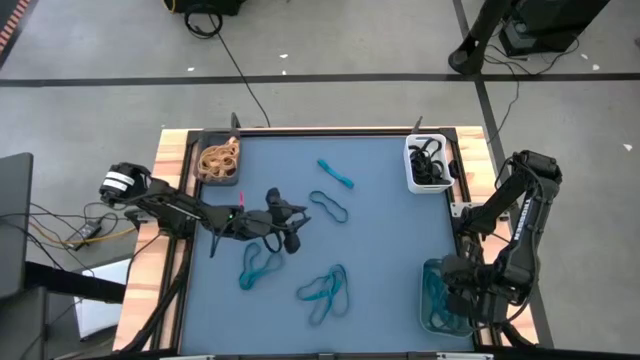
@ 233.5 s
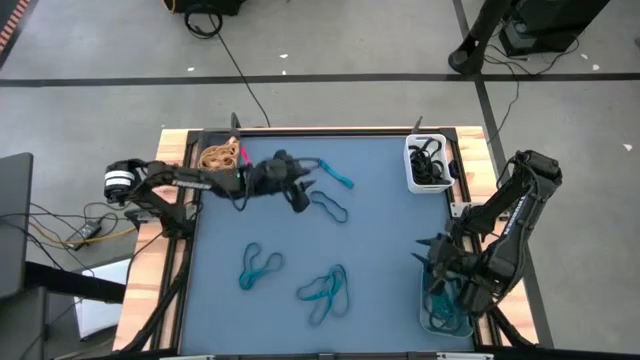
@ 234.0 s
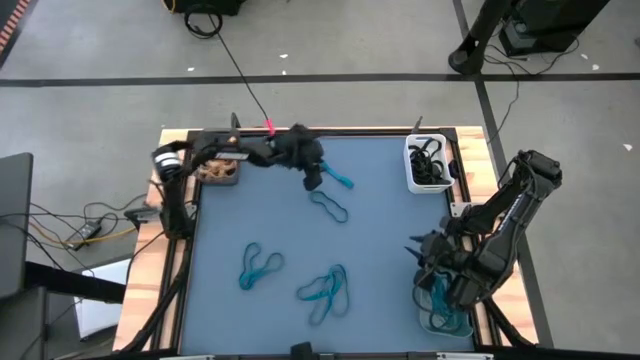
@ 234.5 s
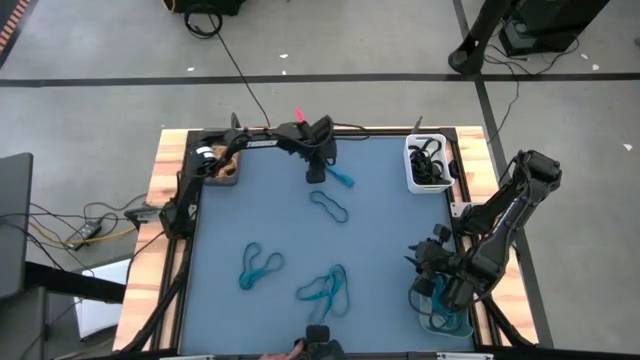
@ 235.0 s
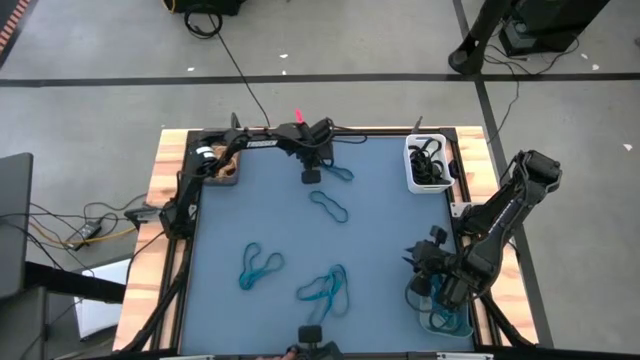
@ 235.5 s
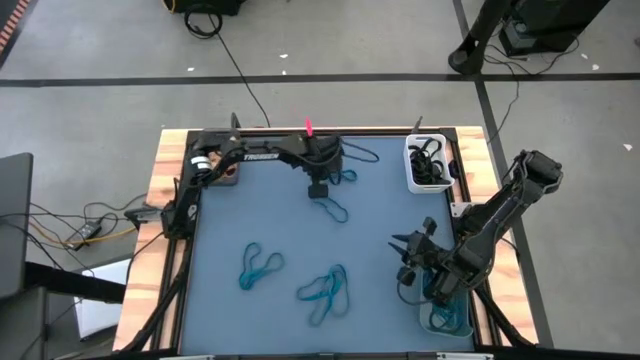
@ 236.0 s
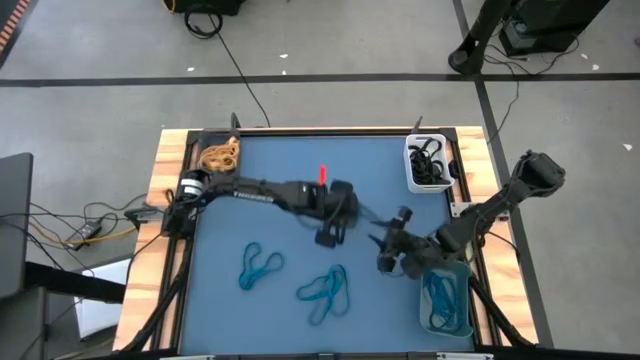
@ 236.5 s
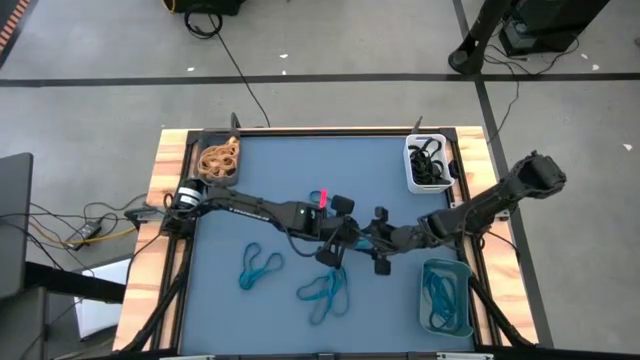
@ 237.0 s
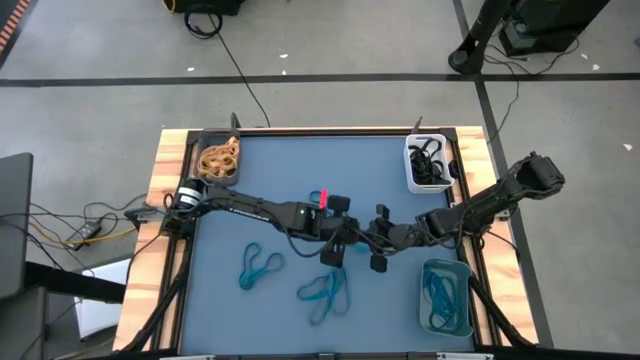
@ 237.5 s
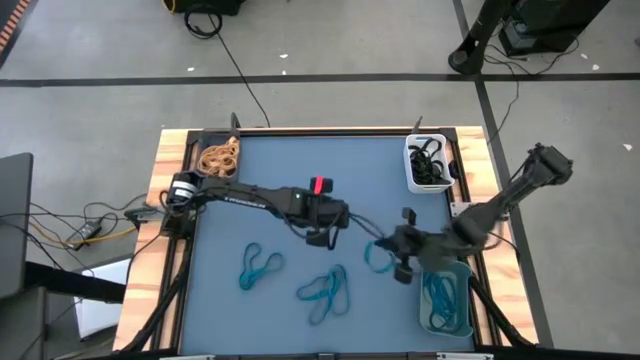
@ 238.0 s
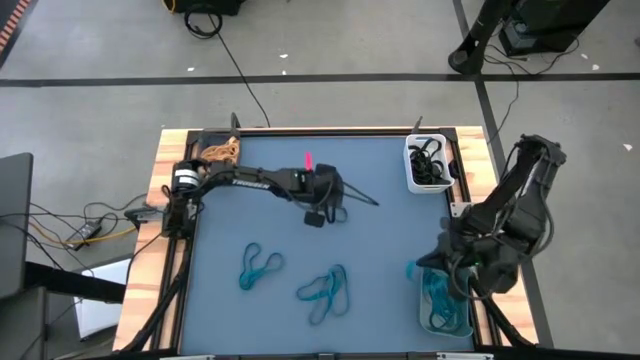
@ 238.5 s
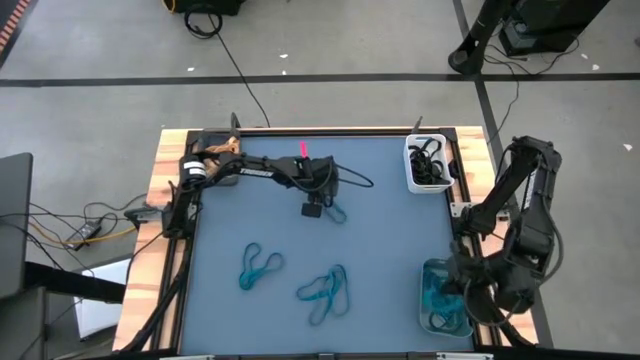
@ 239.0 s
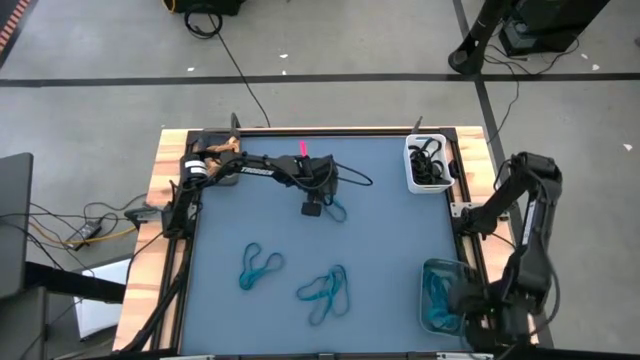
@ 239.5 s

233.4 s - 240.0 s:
Task: Sort rubber bands into baskets
Put the blue rubber band into the blue bin

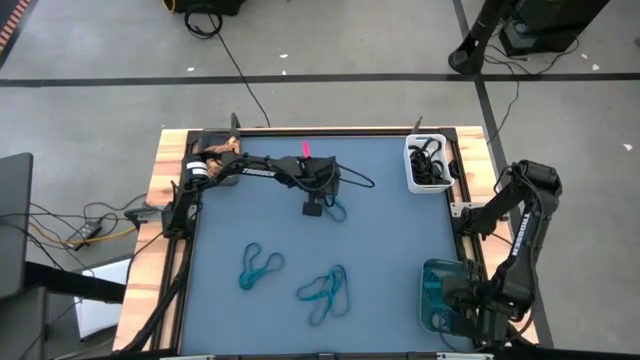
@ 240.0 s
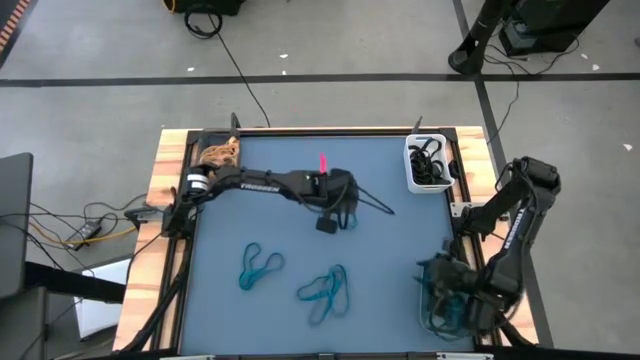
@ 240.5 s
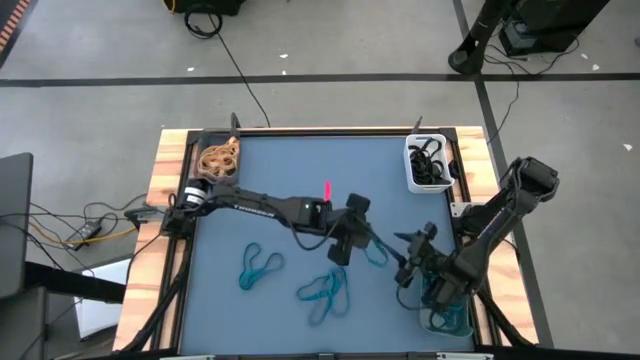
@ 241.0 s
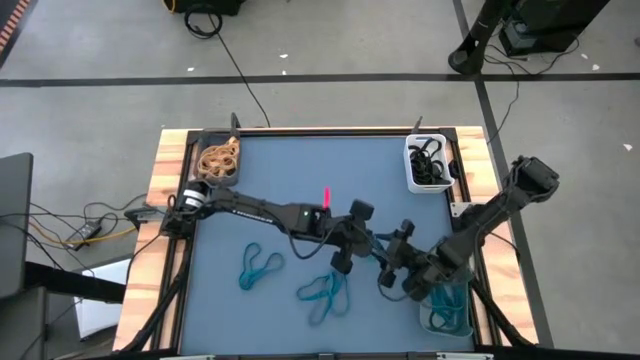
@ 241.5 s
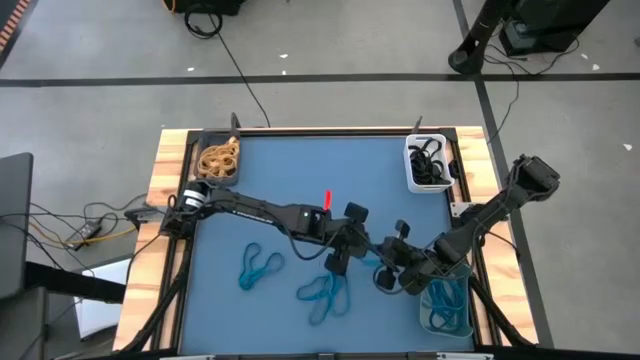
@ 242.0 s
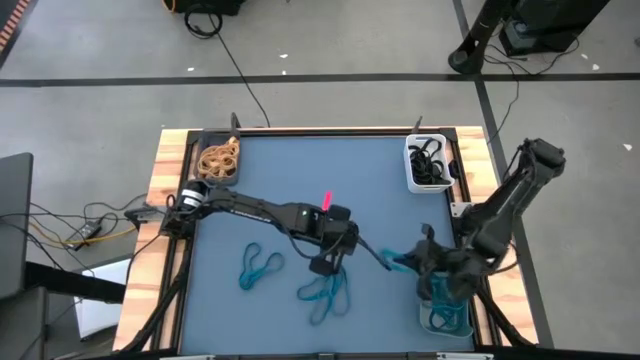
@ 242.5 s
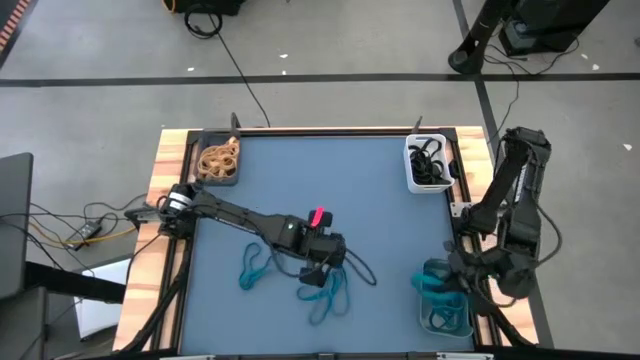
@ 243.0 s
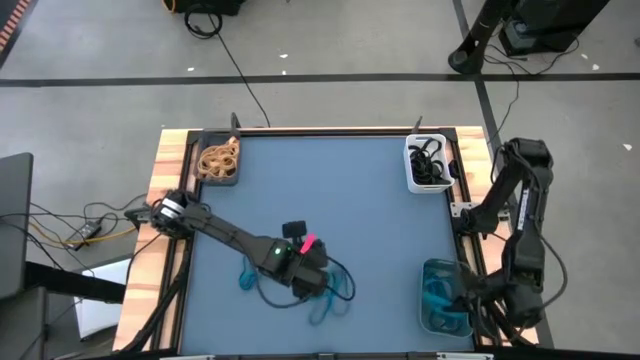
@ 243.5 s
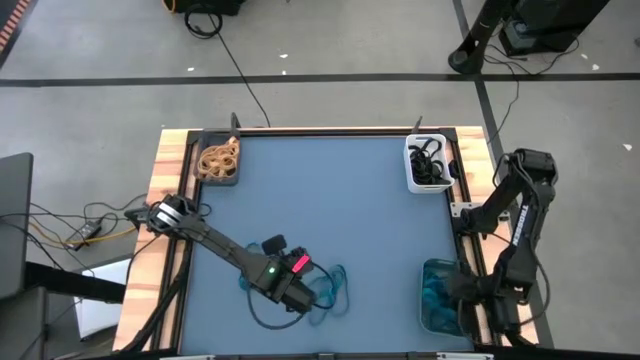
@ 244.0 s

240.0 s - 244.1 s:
Put the blue rubber band into the blue bin

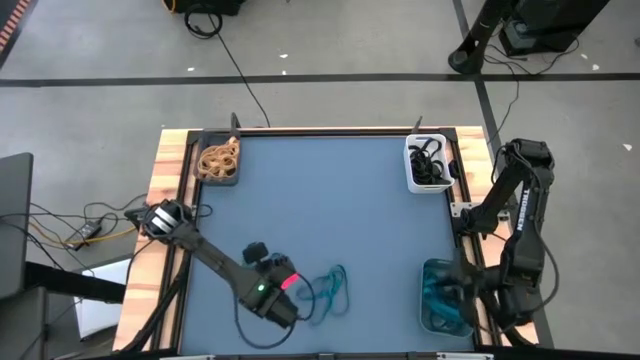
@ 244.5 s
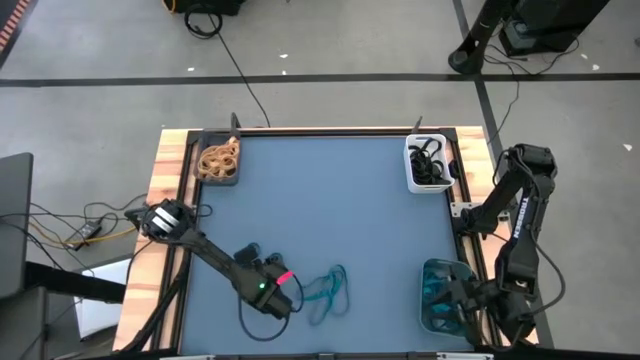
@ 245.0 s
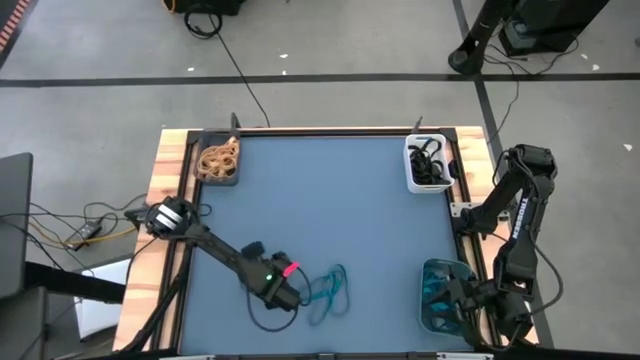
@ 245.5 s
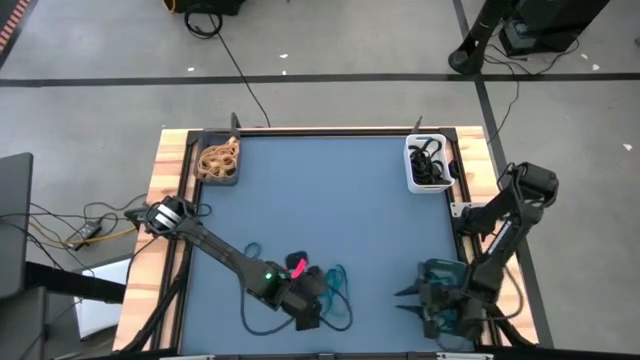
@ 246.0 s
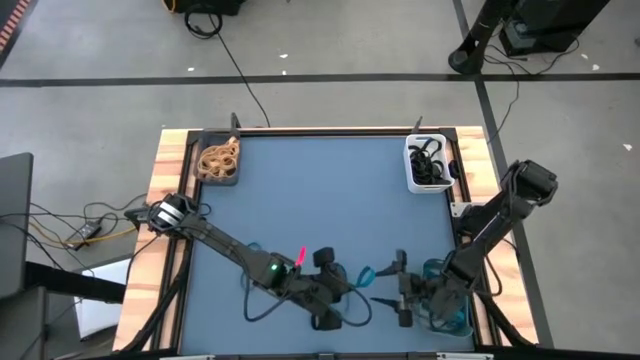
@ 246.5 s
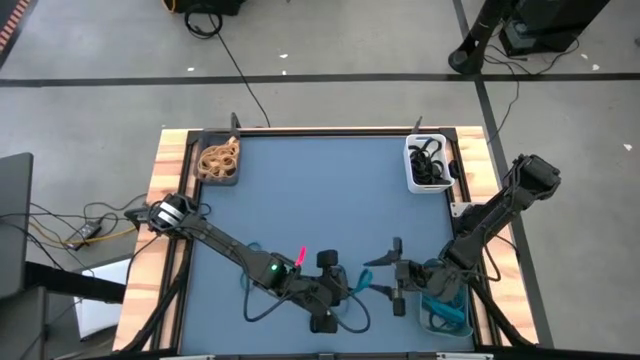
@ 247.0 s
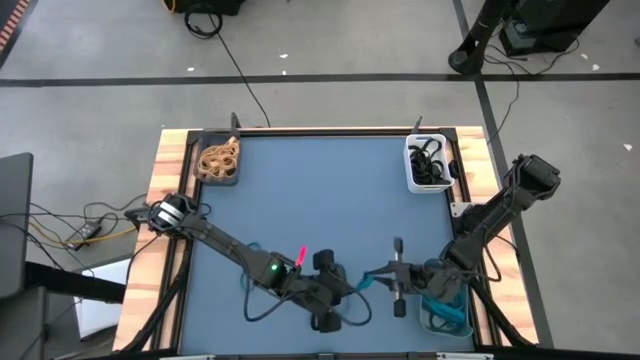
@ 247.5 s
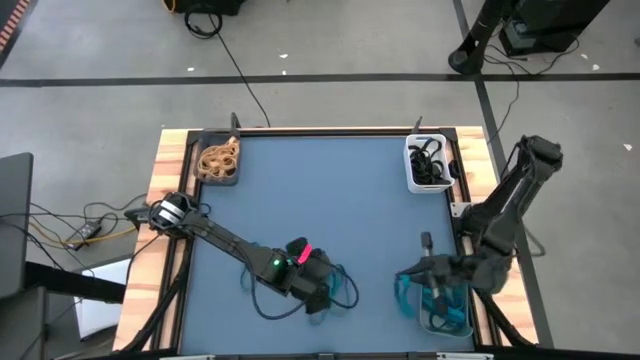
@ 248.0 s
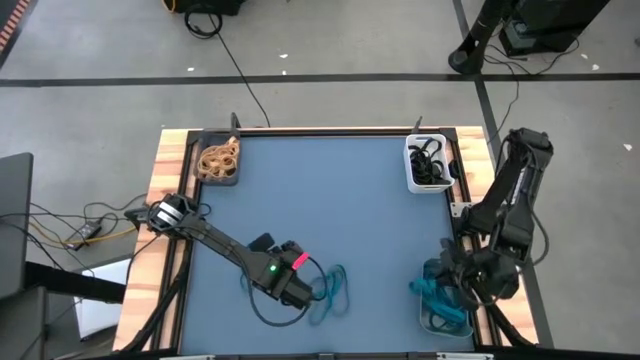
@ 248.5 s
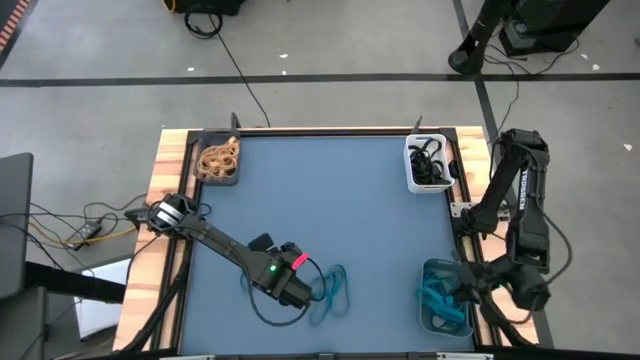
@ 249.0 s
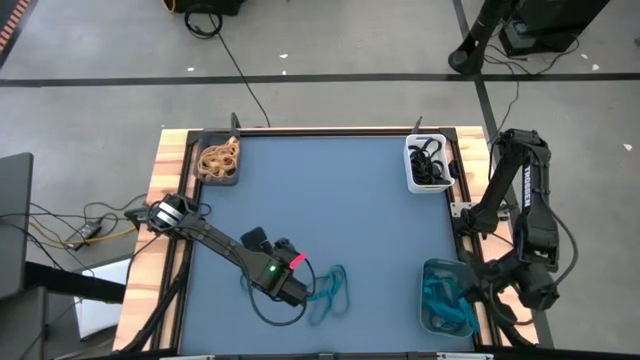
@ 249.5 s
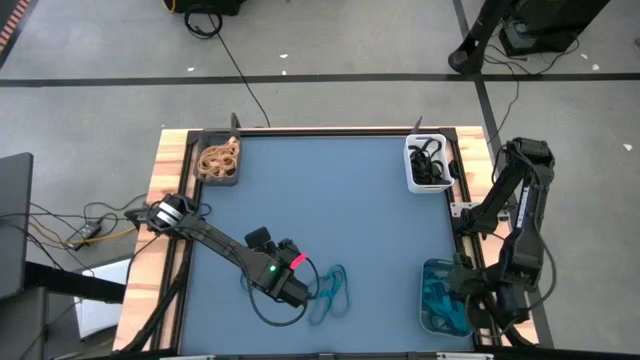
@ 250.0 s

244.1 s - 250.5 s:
Put the blue rubber band into the blue bin

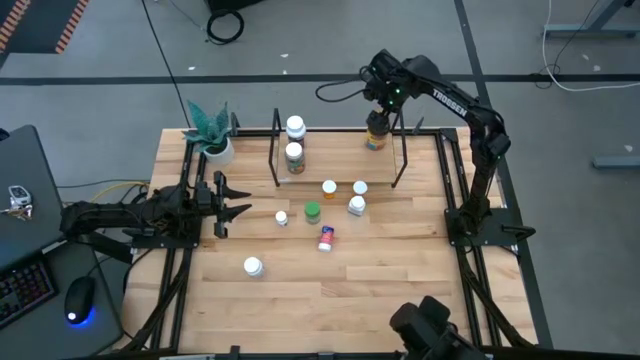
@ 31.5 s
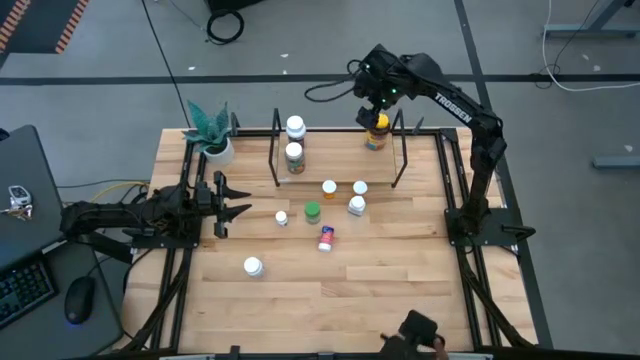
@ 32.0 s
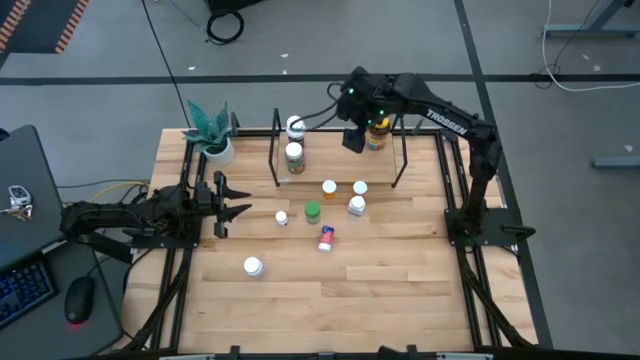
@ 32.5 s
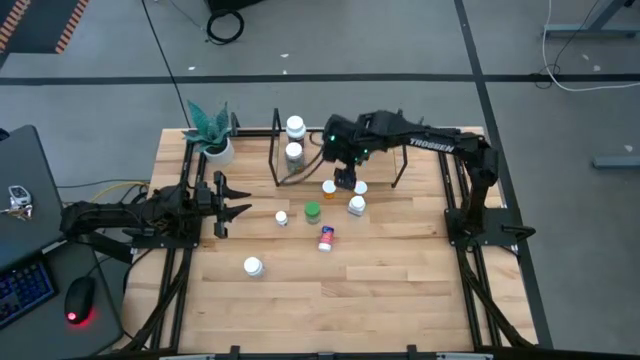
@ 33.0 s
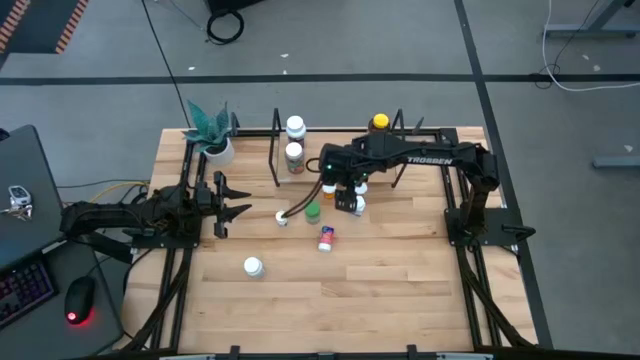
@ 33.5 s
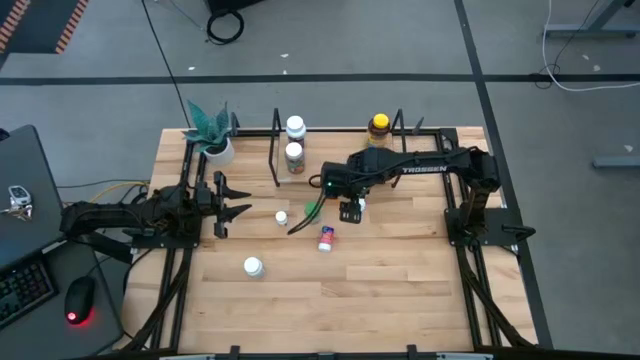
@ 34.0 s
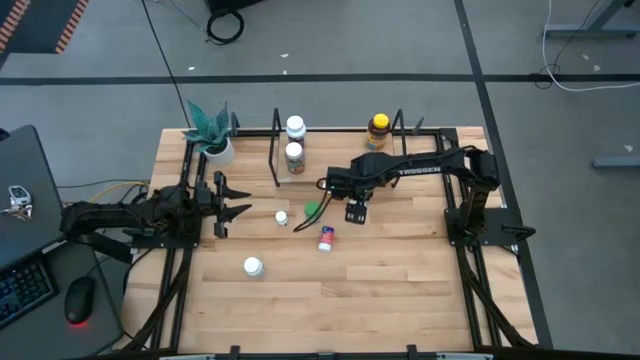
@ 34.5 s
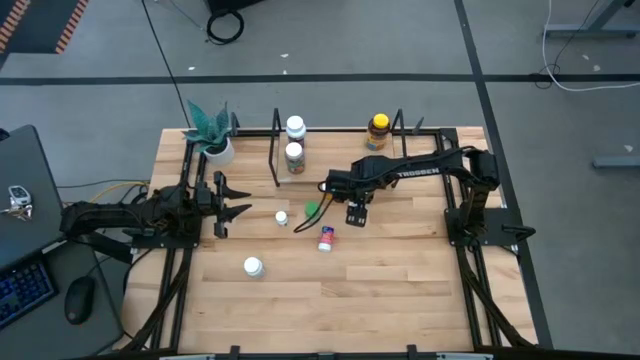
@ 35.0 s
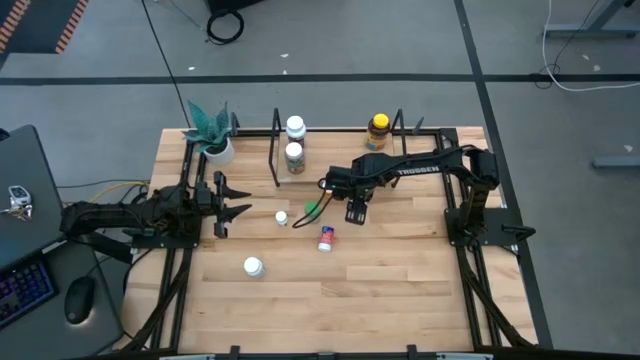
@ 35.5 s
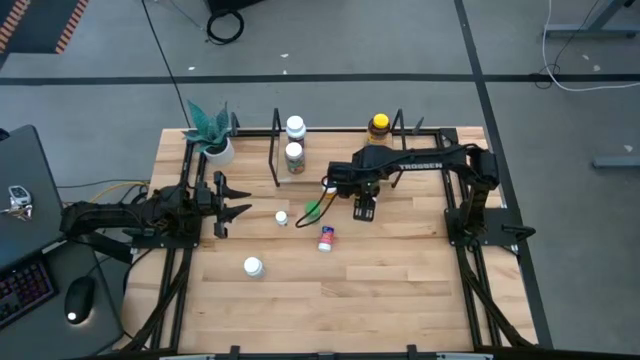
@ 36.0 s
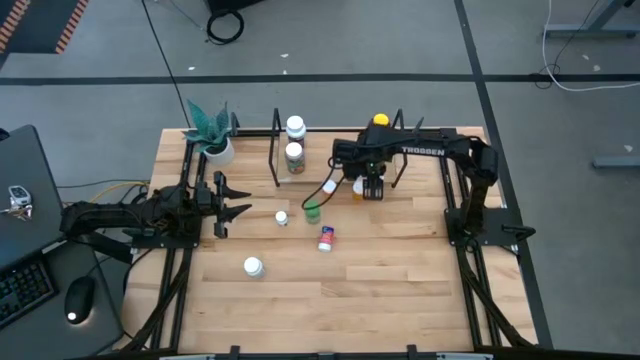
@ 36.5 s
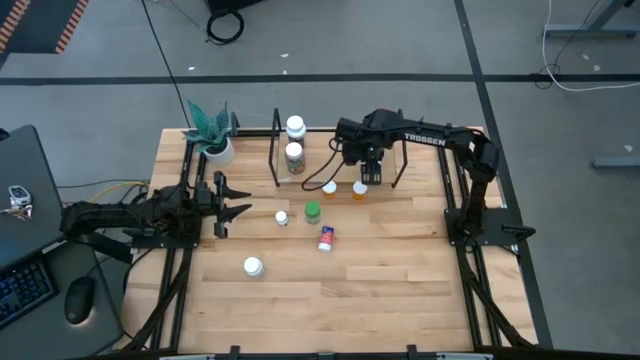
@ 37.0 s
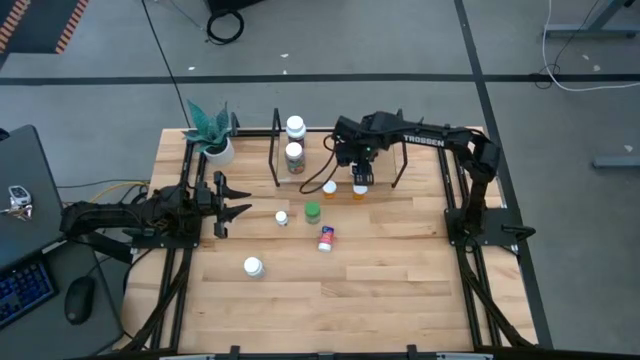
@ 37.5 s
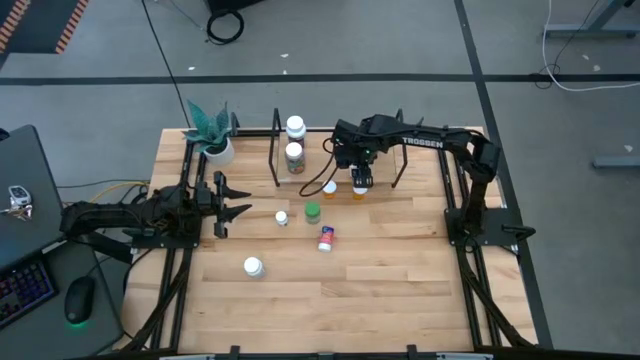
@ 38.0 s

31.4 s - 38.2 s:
Task: Pick and place medicine bottles onto shelf by color
Put the top medium white pill bottle on the shelf
